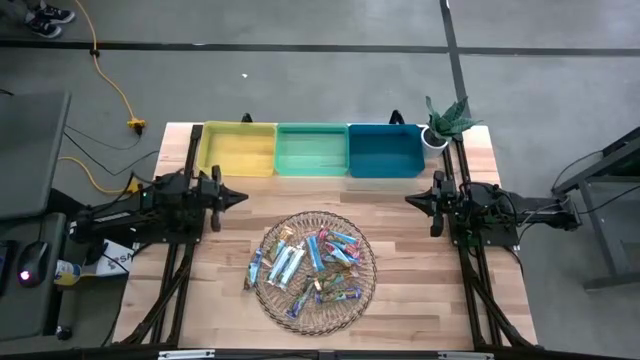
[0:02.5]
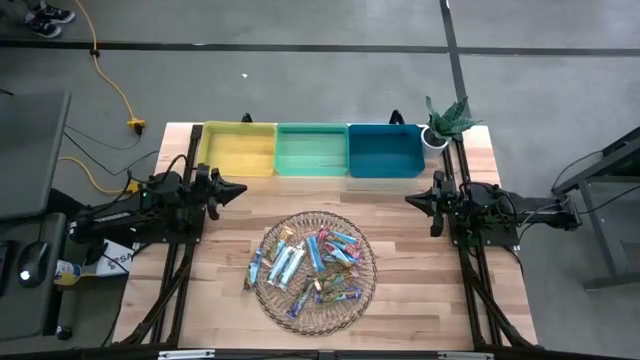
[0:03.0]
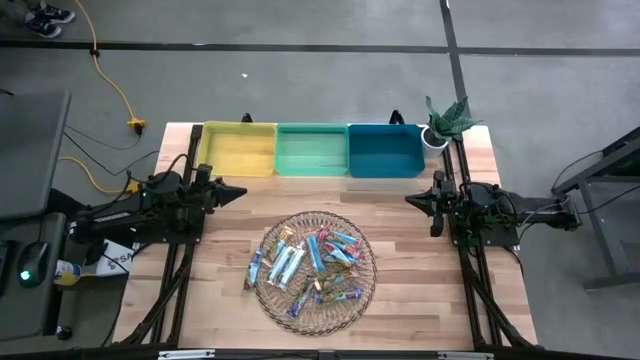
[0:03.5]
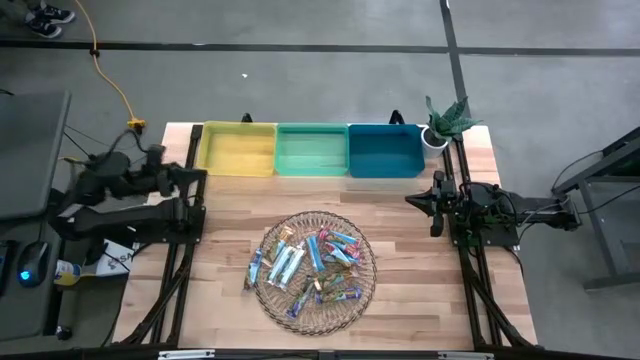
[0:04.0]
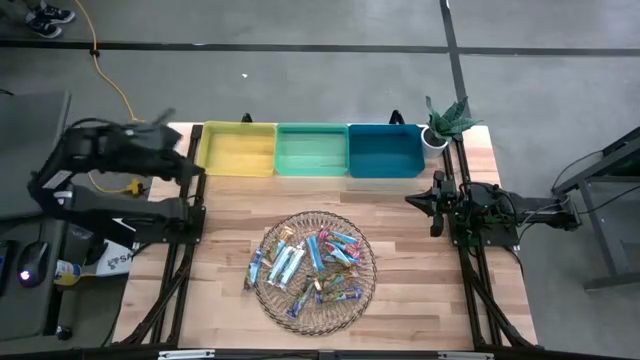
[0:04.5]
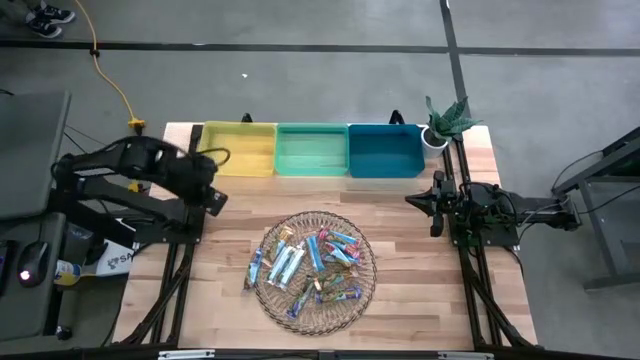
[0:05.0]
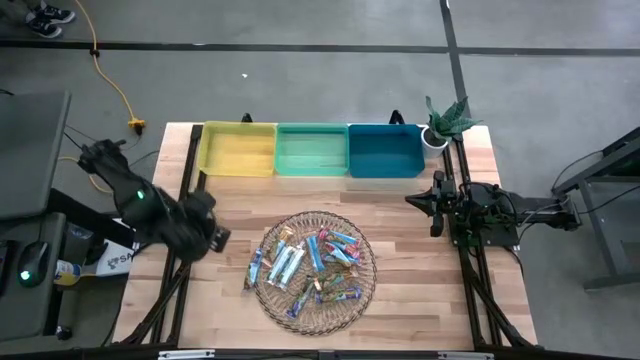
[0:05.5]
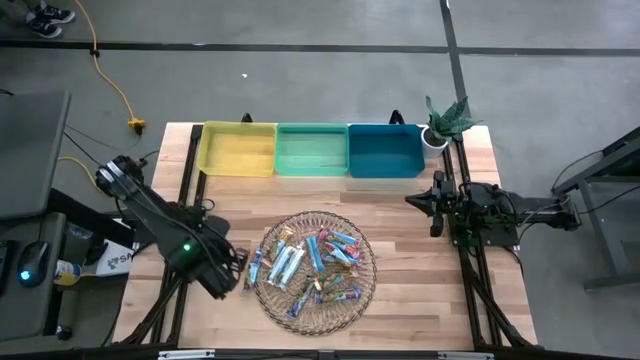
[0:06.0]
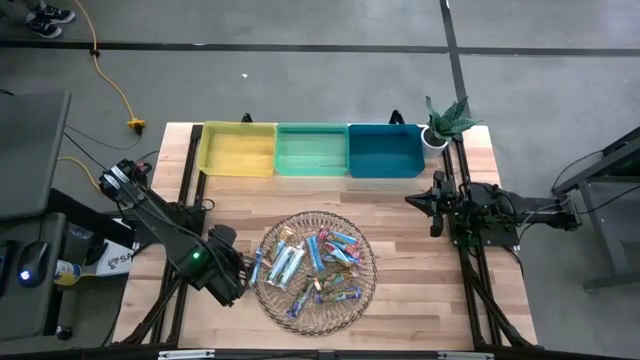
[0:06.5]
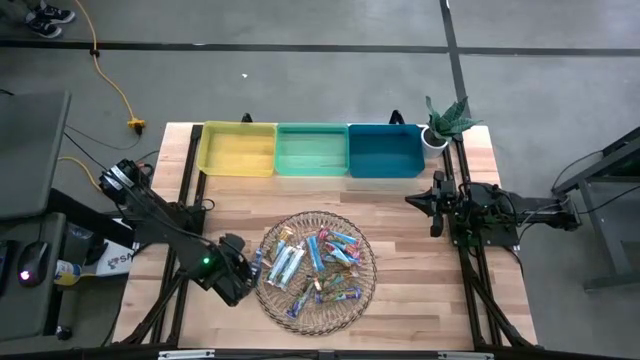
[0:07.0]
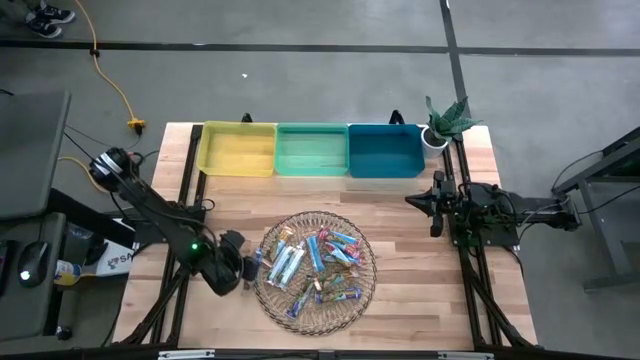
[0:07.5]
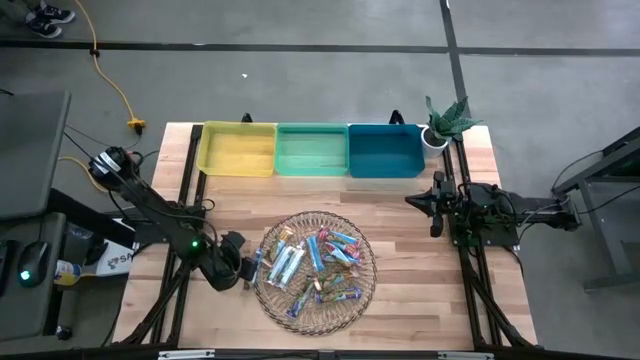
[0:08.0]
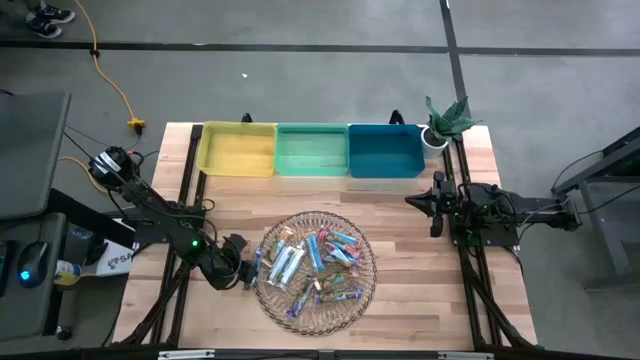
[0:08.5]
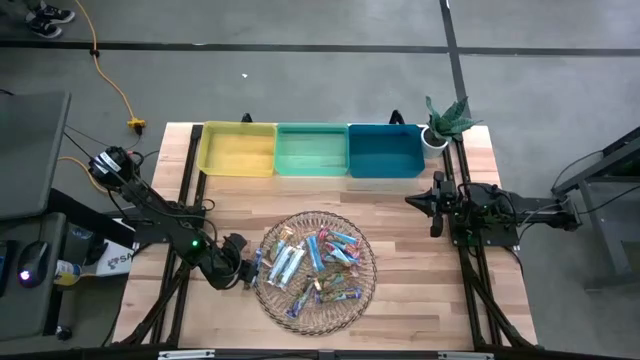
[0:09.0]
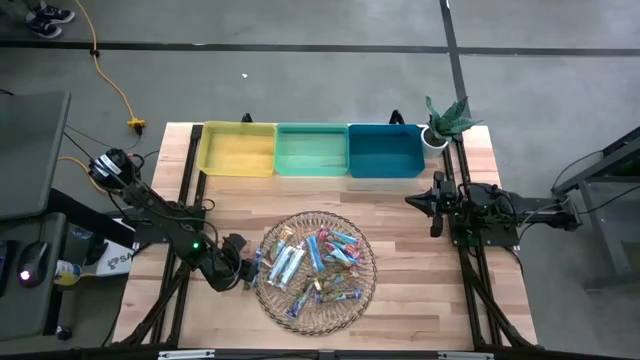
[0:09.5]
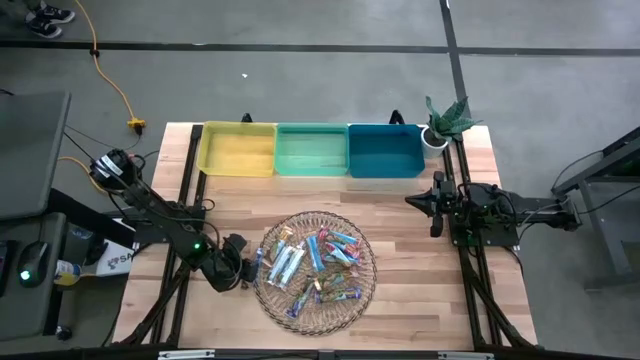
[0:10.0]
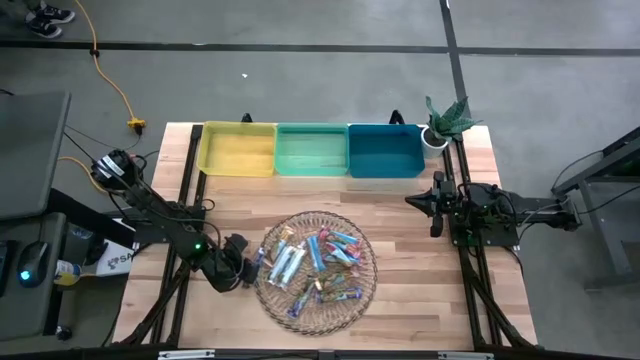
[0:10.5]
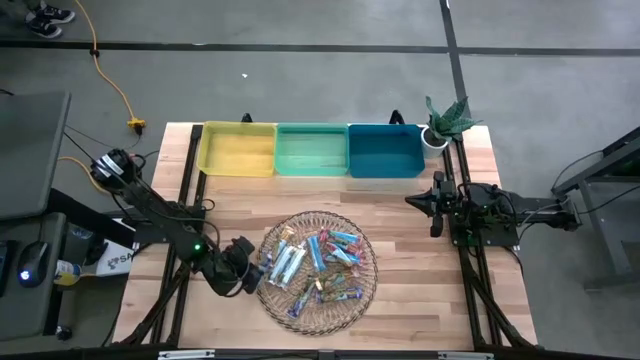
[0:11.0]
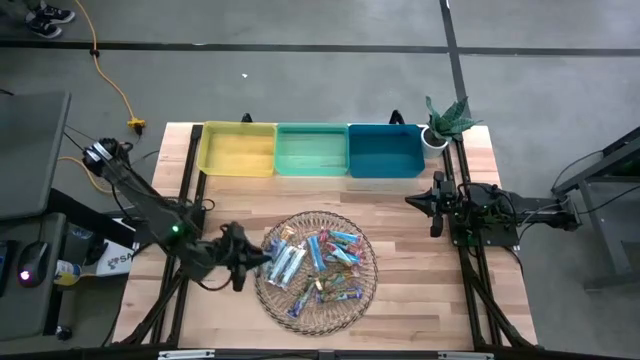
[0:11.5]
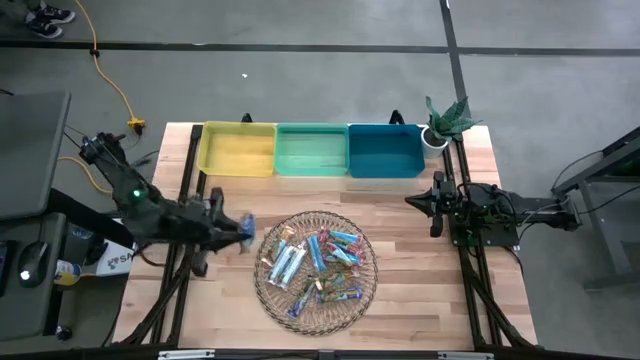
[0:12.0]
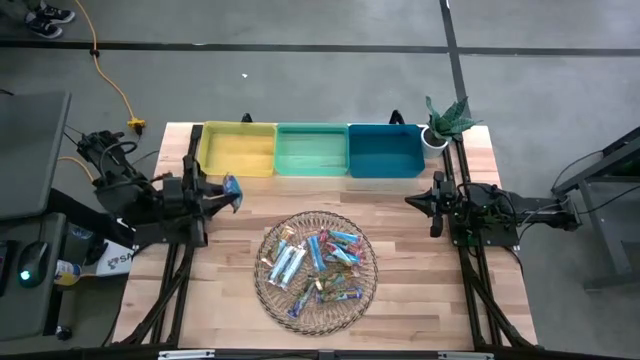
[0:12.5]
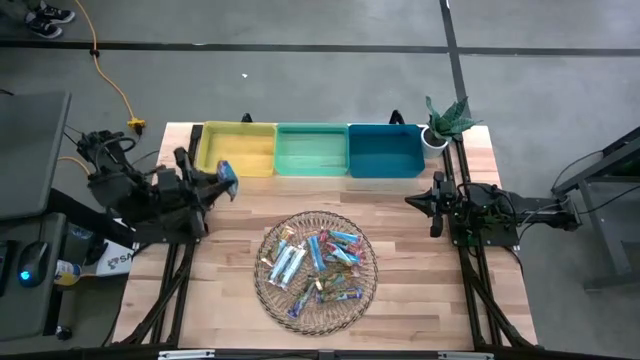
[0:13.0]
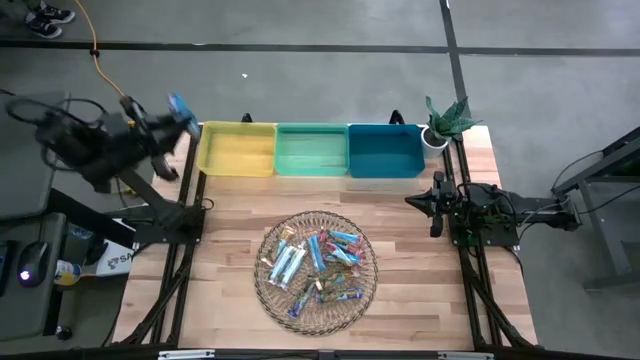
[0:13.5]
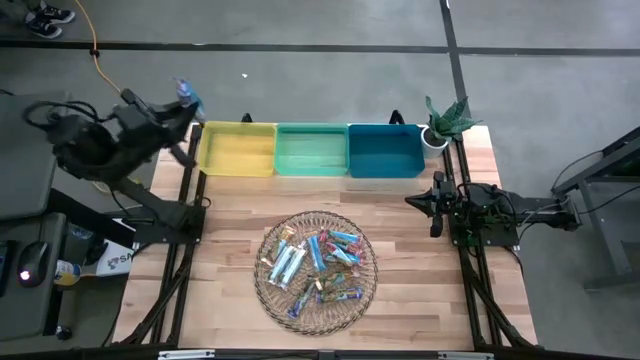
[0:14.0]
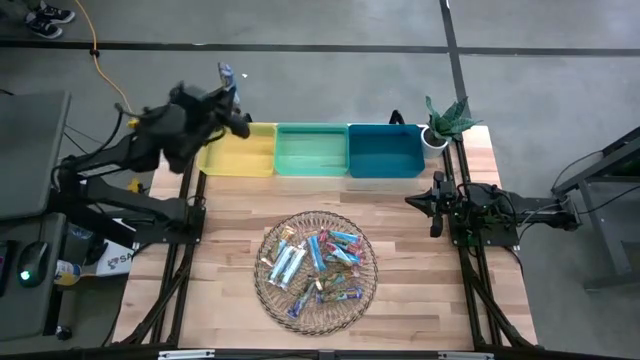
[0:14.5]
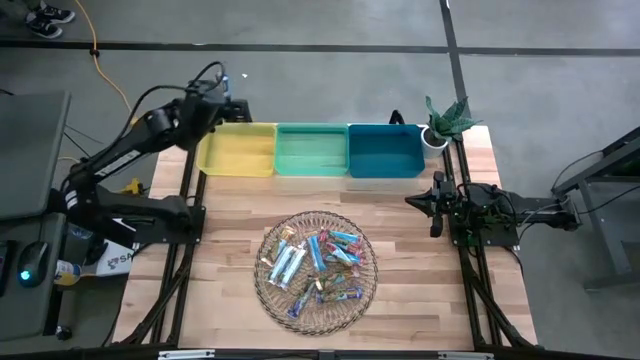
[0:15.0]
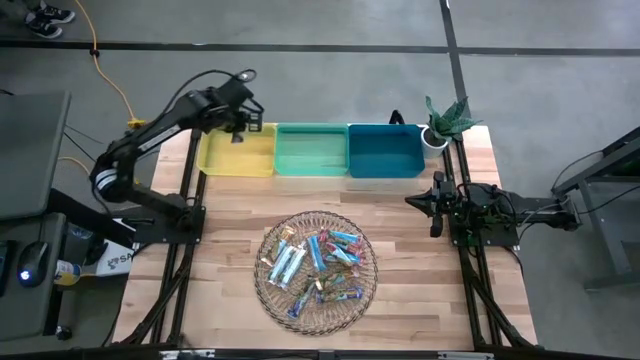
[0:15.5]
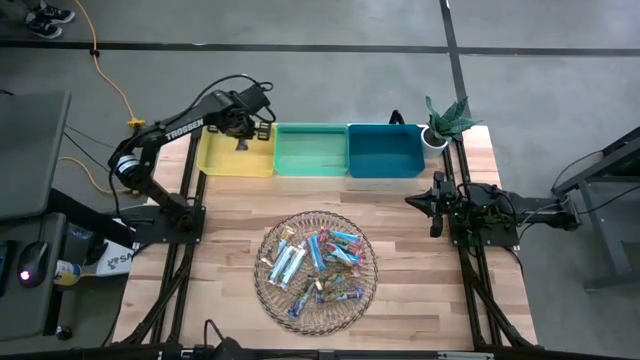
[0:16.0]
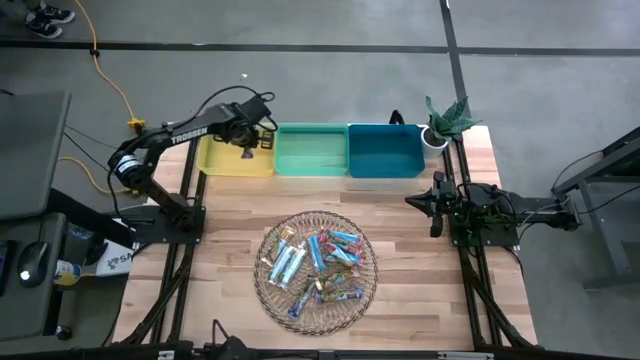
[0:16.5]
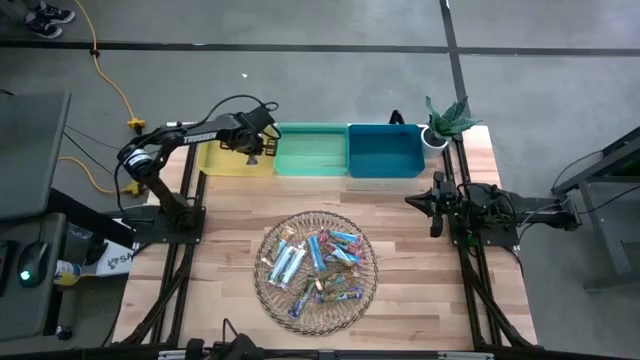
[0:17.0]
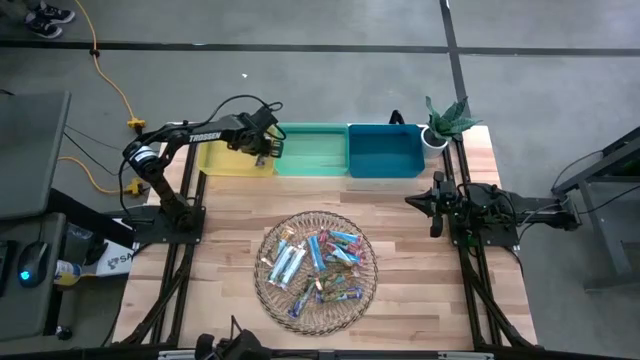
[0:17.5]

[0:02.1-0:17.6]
Task: Pick and place Granola Bars by type
Put the blue granola bar into the yellow bin
